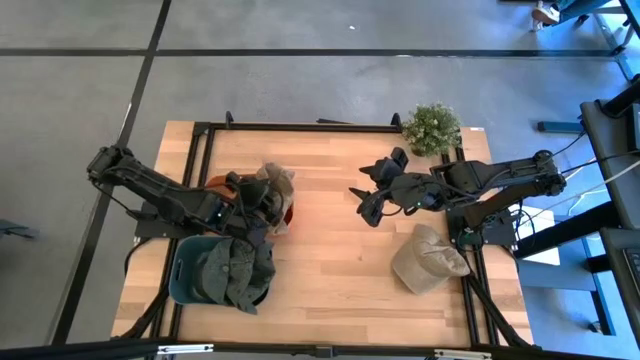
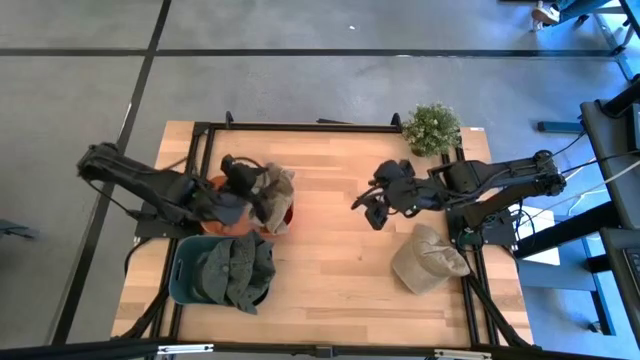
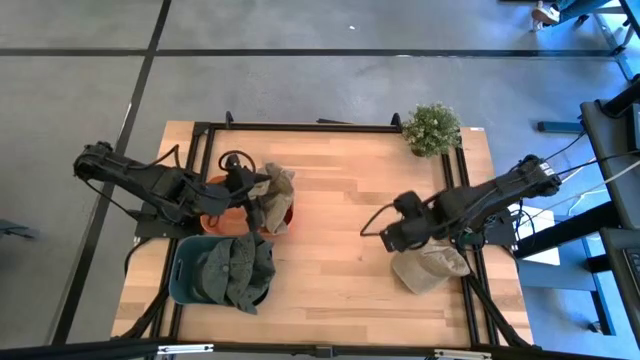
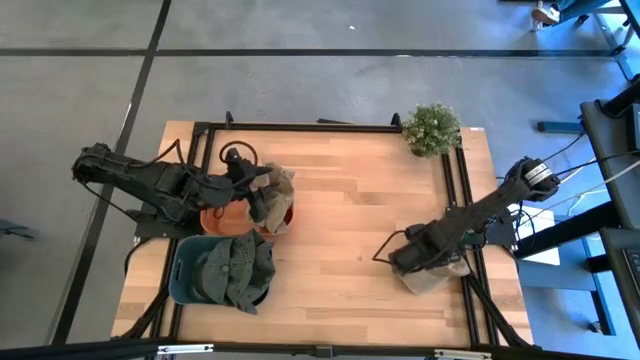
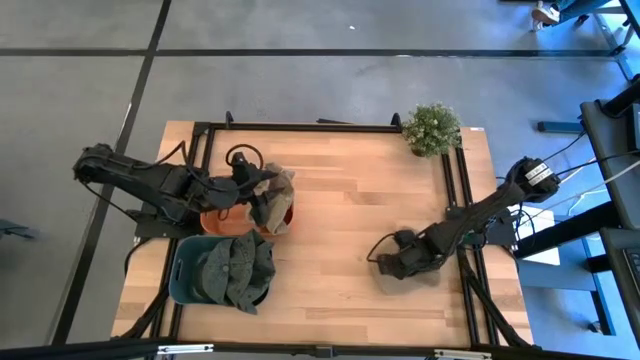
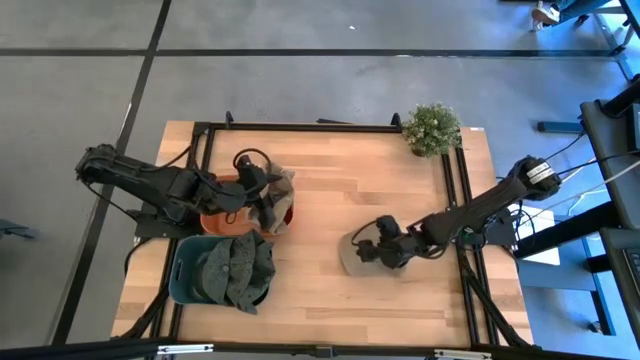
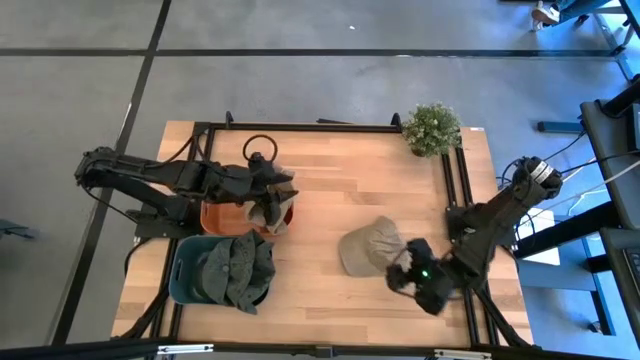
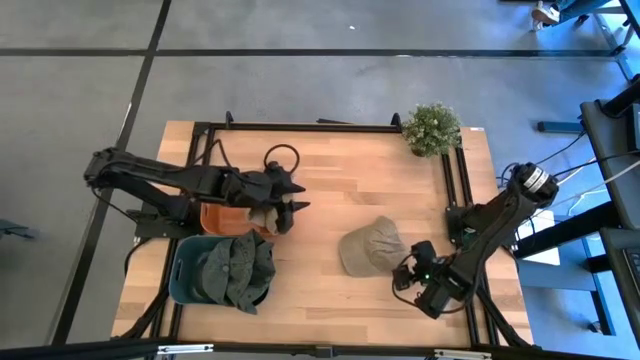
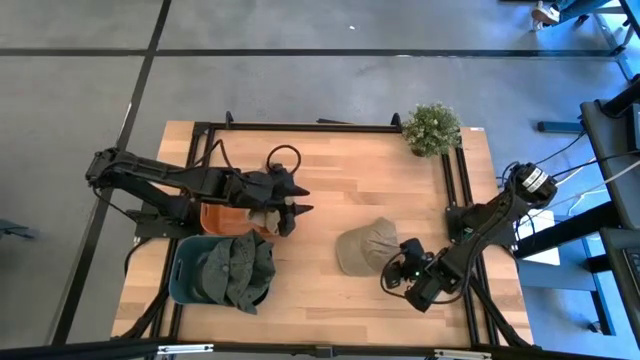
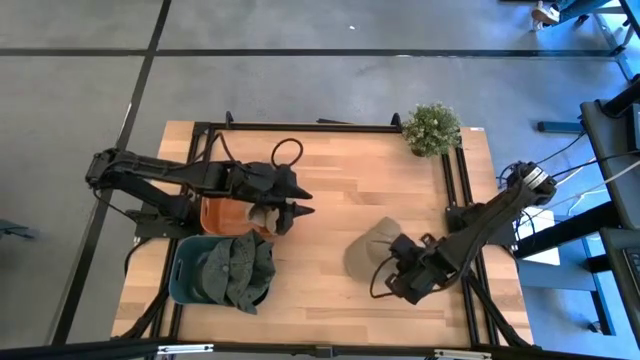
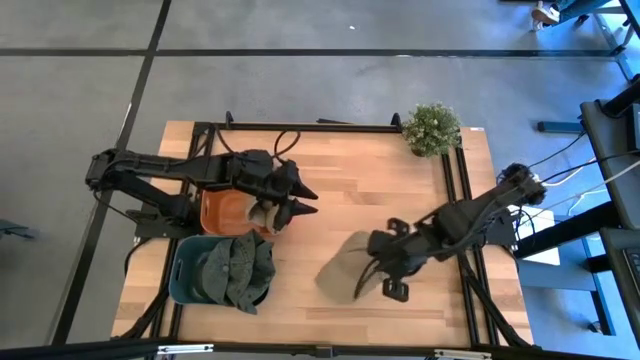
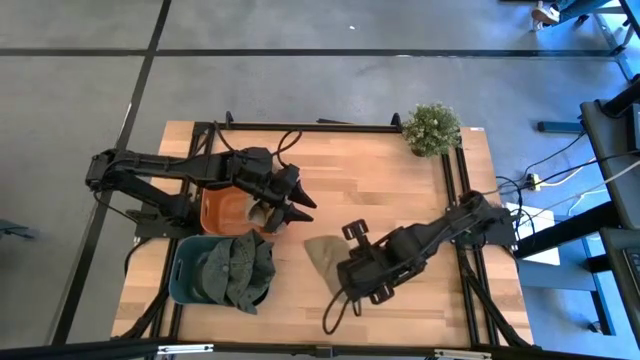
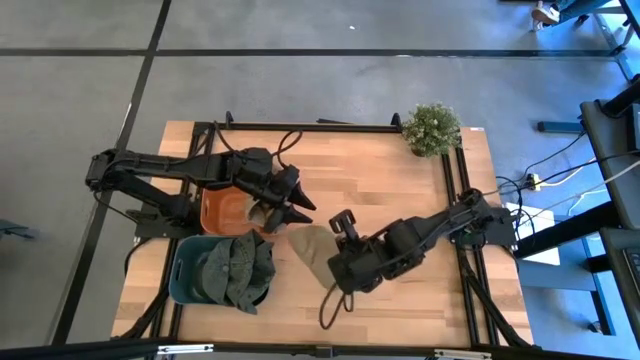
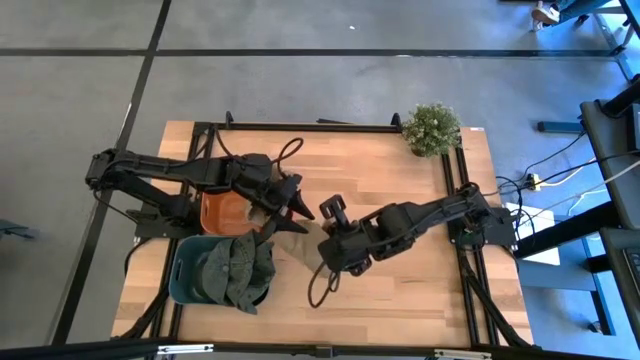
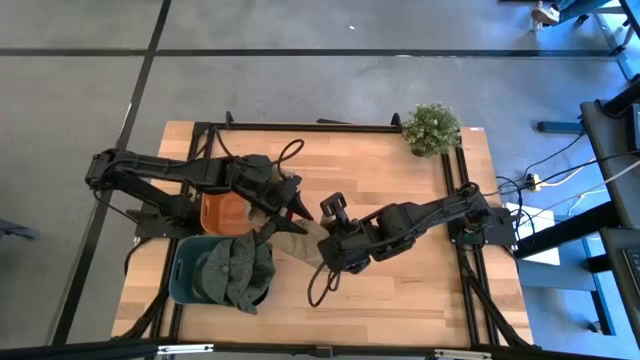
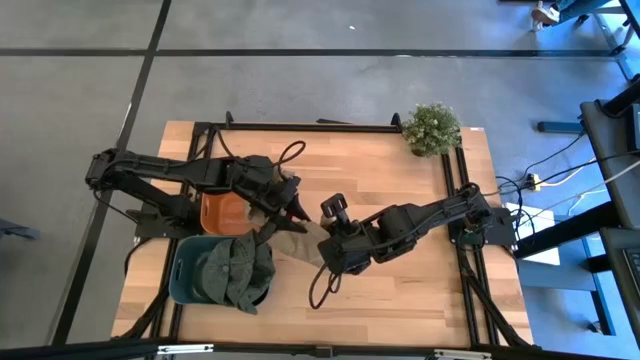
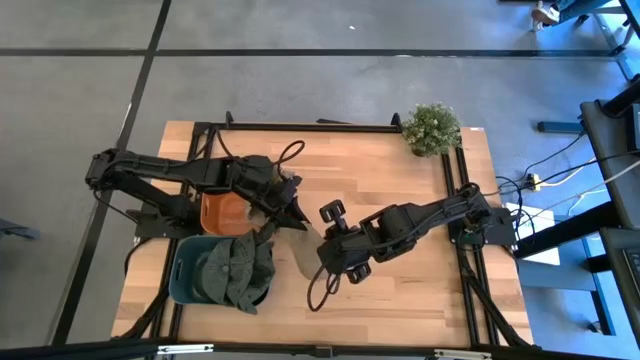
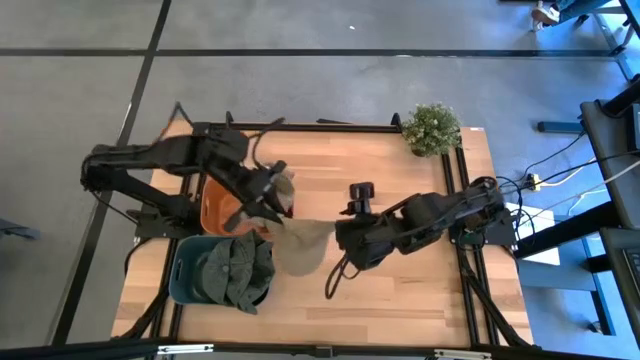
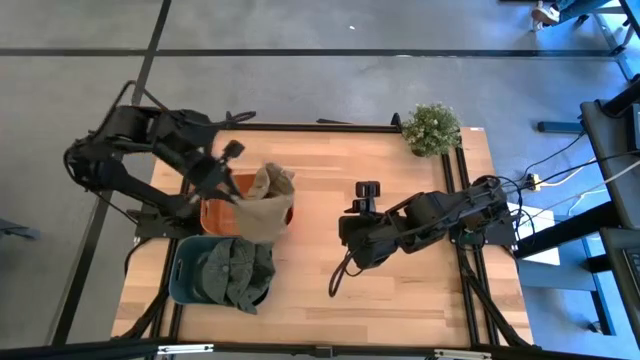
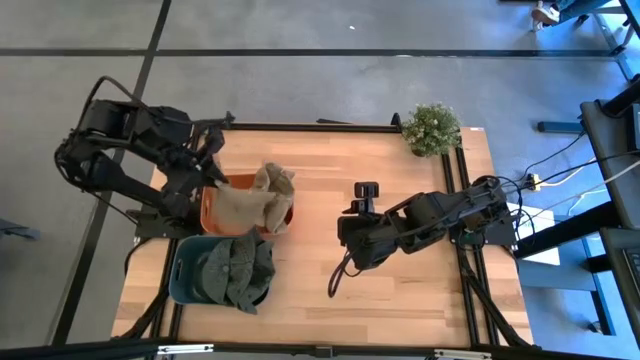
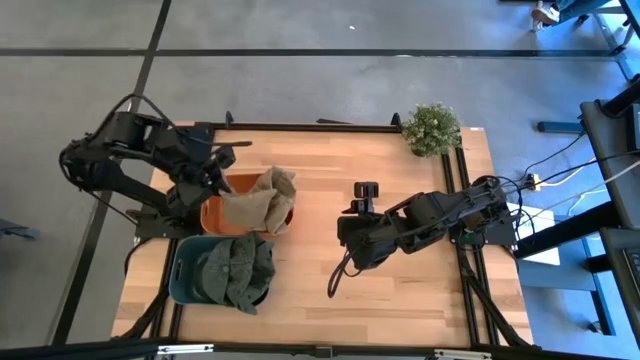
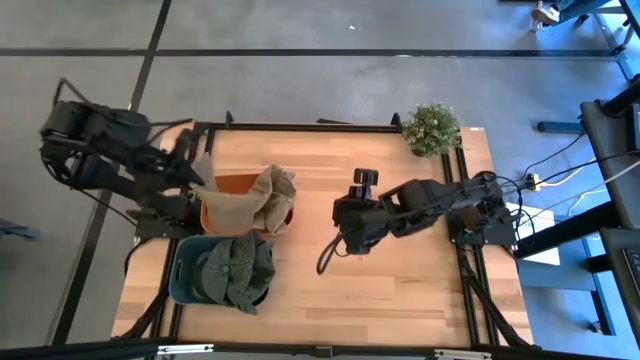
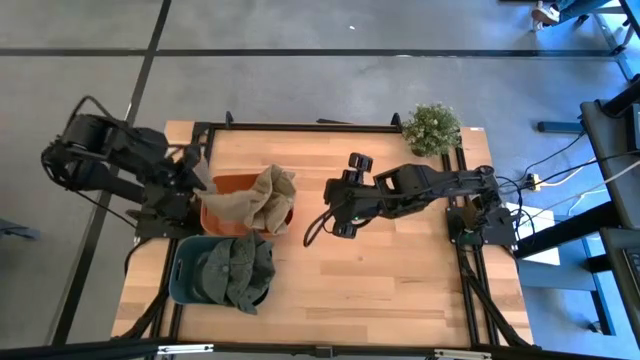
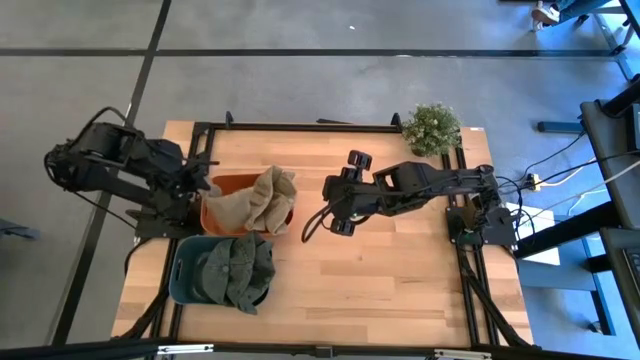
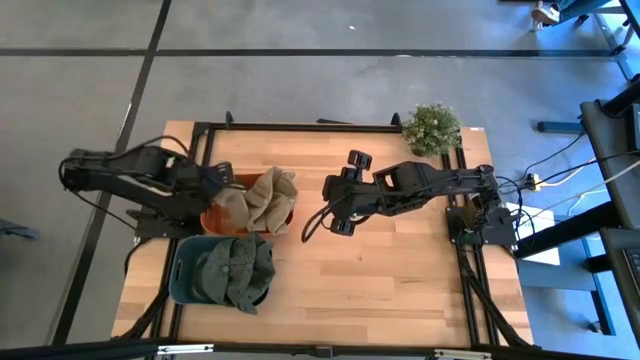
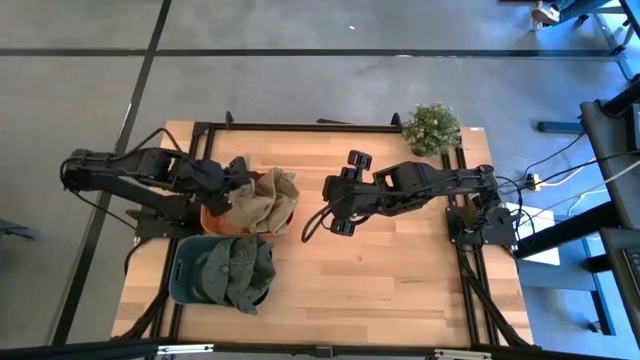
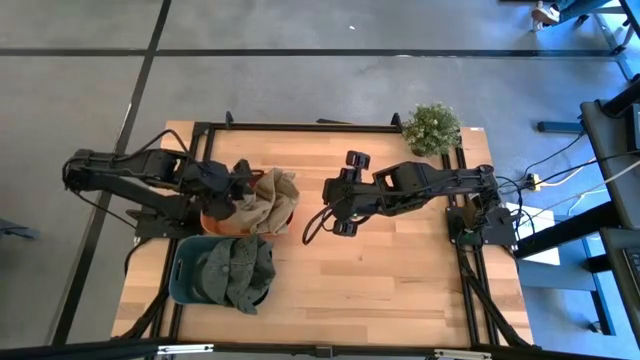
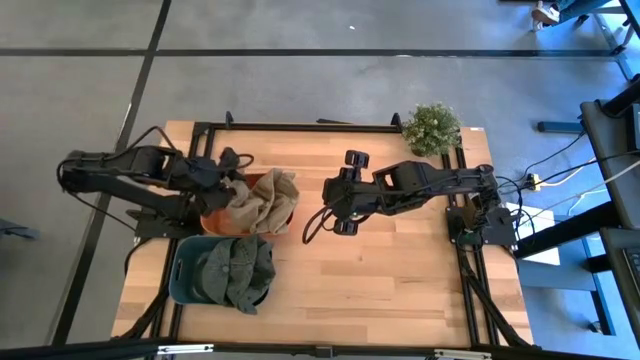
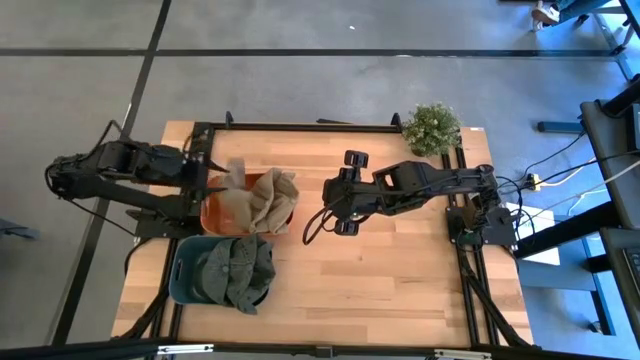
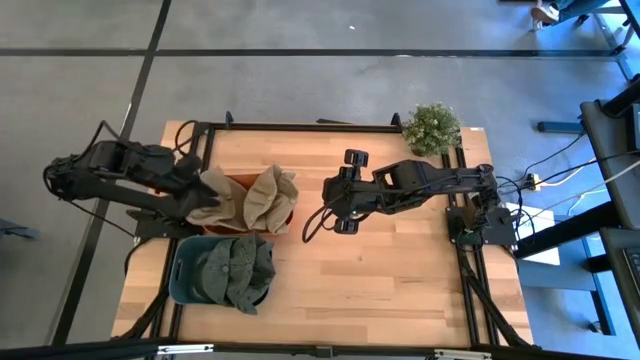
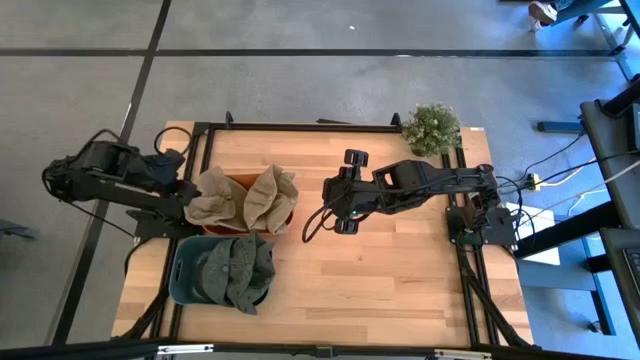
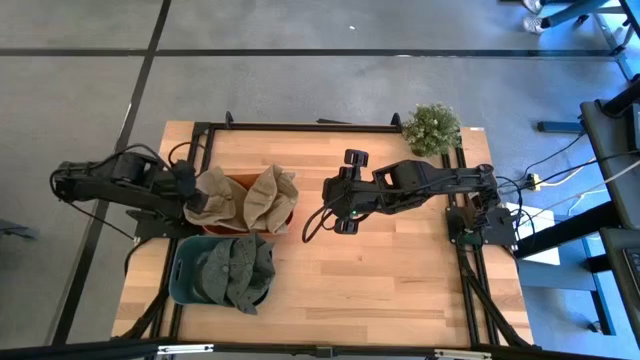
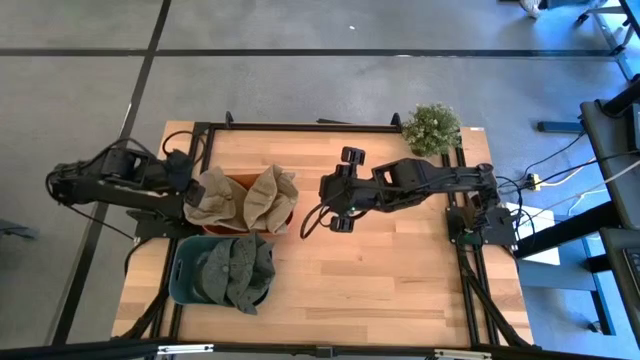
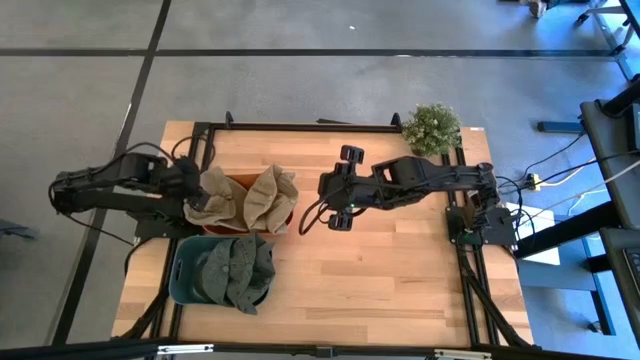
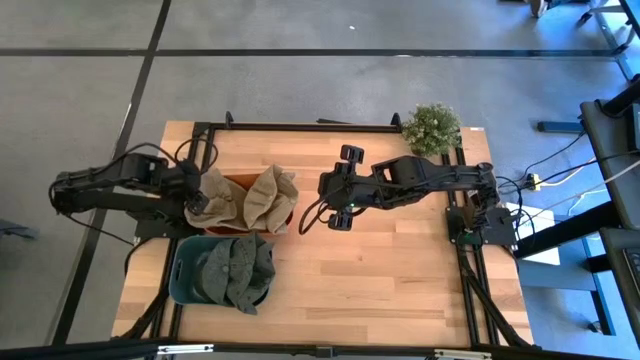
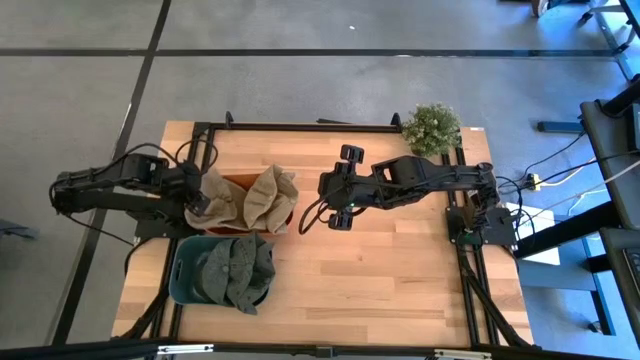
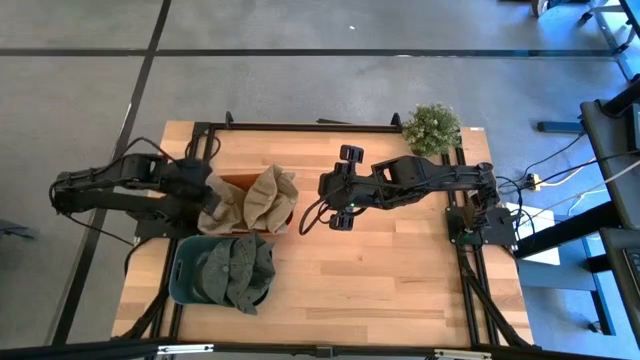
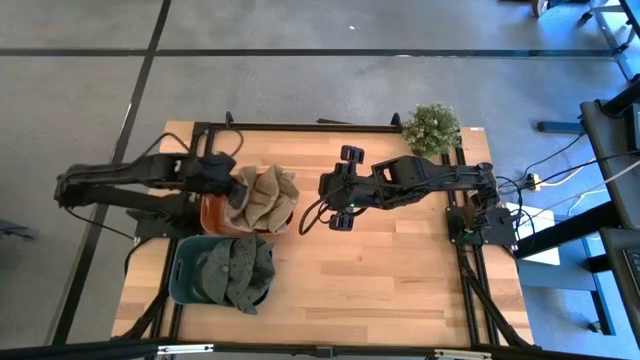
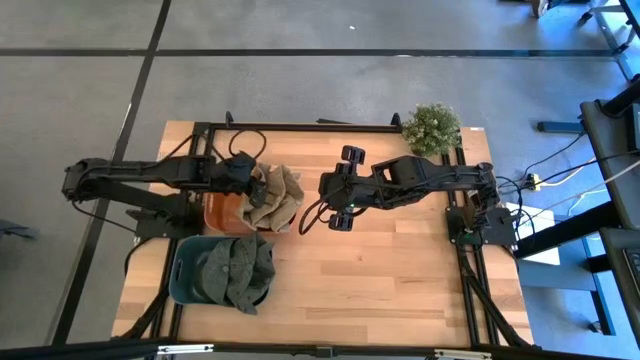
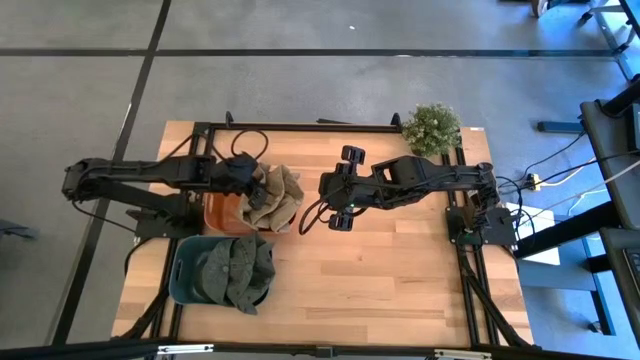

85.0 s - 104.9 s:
Task: Pick & Place hat
Put the brown cap into the orange bin
